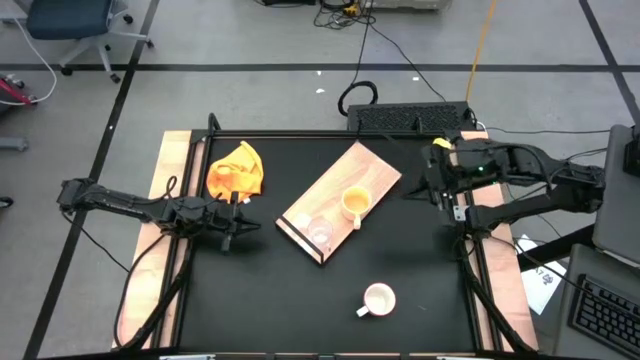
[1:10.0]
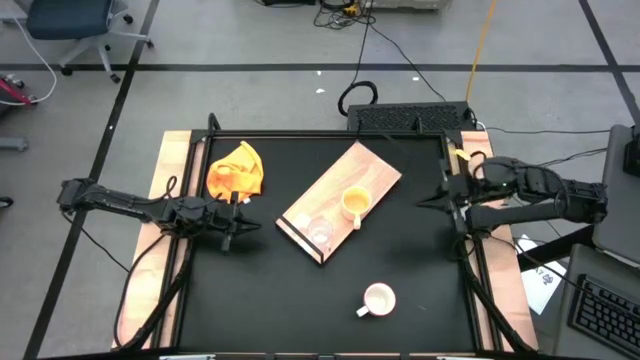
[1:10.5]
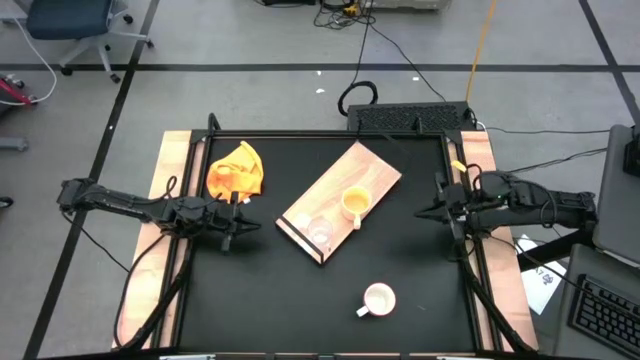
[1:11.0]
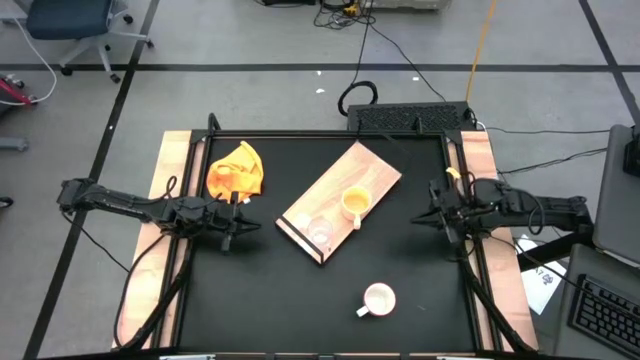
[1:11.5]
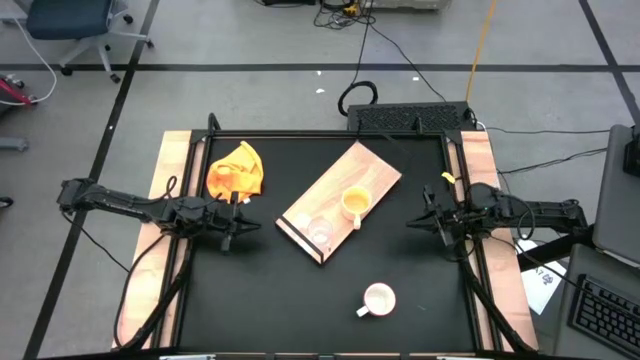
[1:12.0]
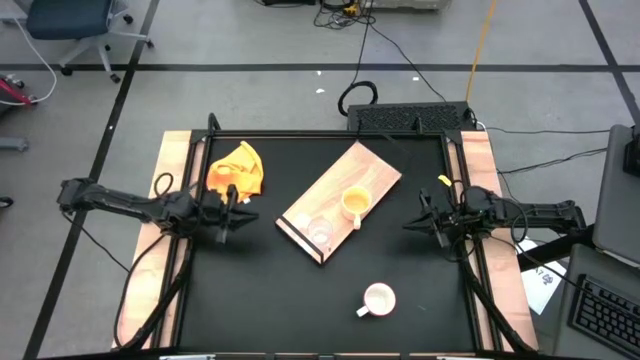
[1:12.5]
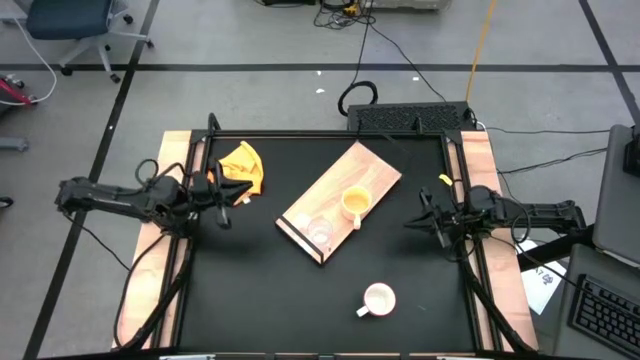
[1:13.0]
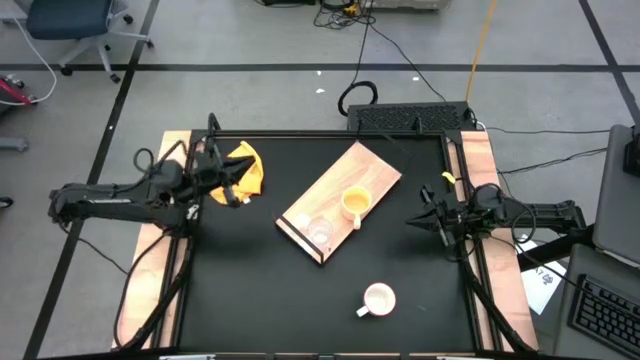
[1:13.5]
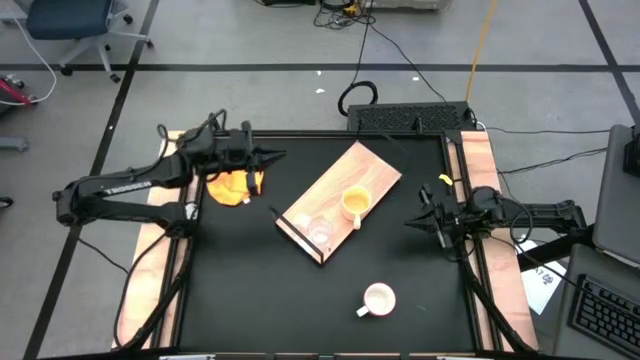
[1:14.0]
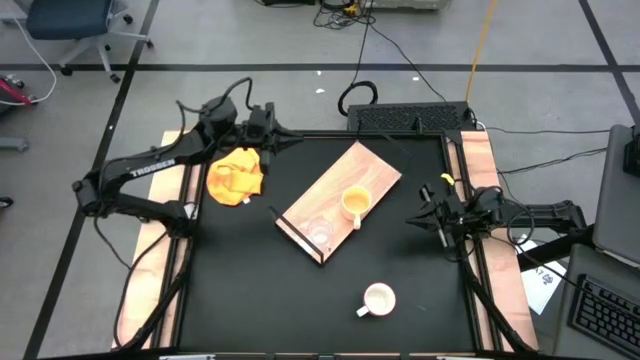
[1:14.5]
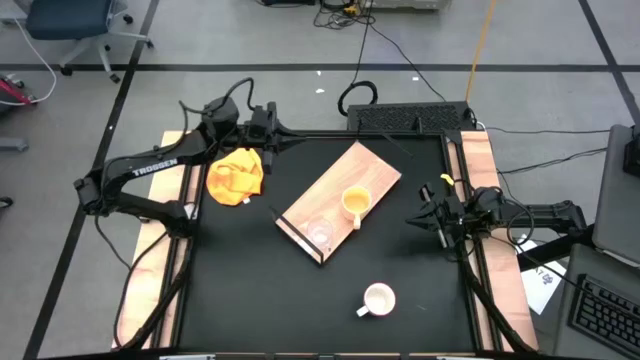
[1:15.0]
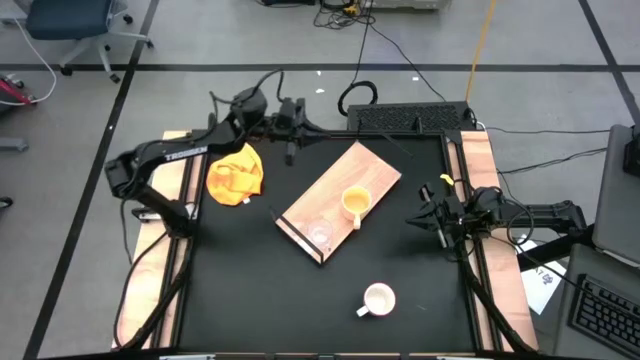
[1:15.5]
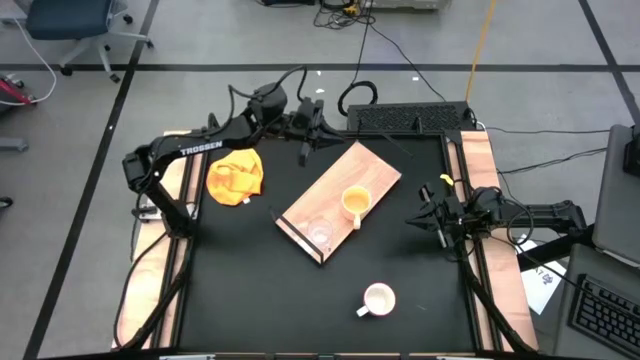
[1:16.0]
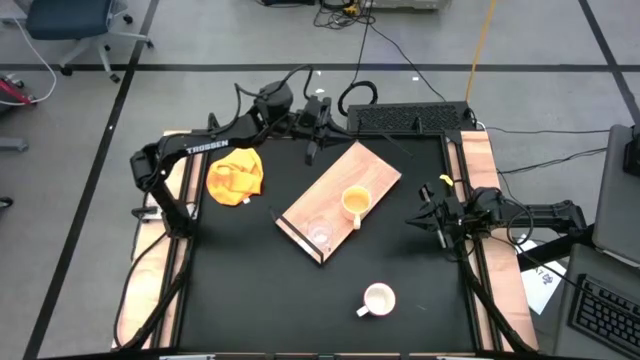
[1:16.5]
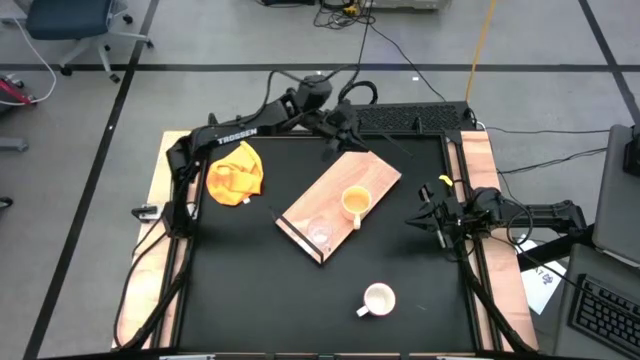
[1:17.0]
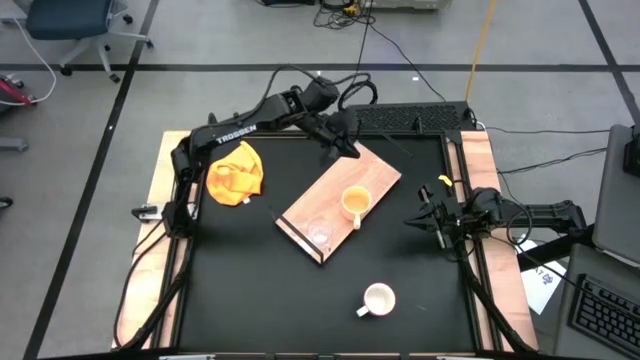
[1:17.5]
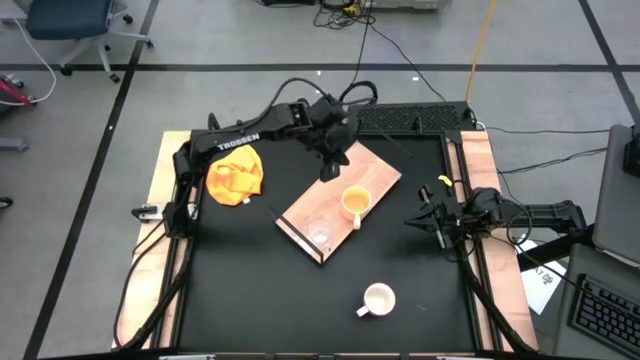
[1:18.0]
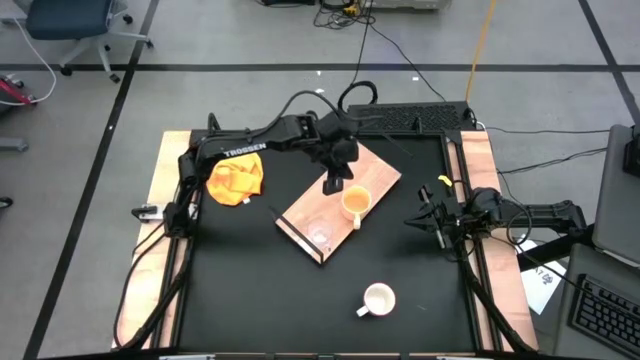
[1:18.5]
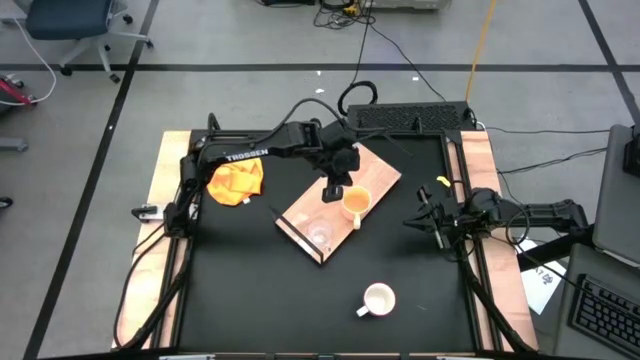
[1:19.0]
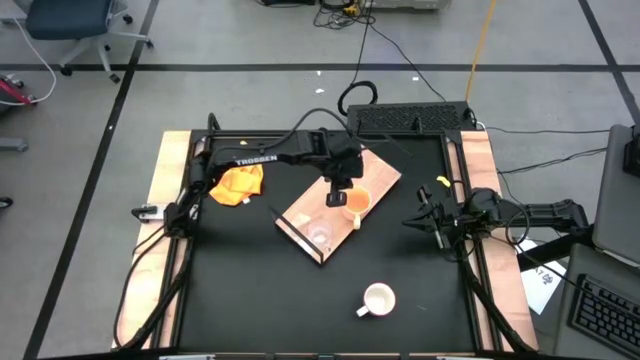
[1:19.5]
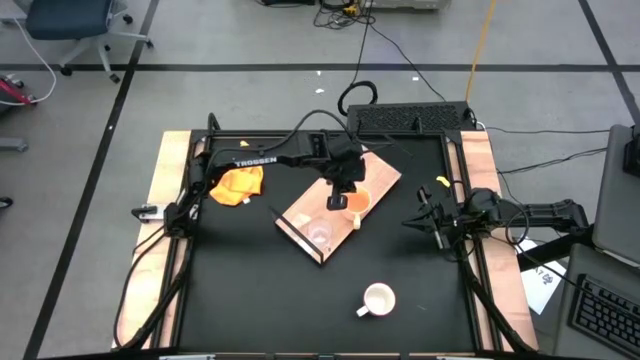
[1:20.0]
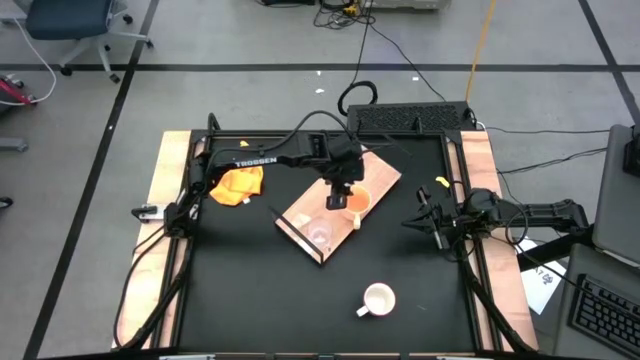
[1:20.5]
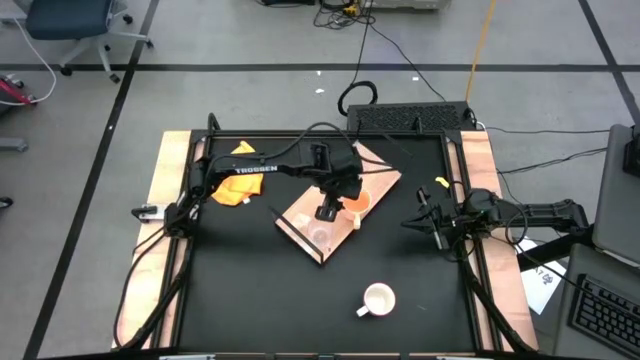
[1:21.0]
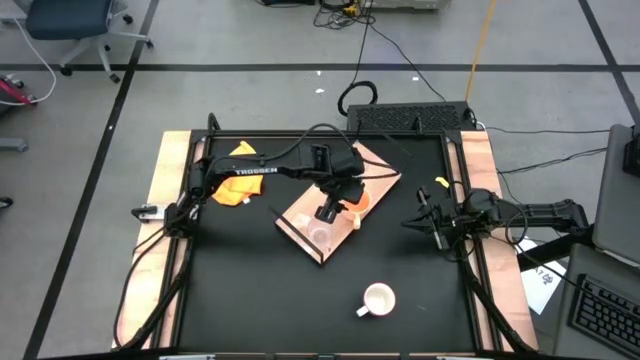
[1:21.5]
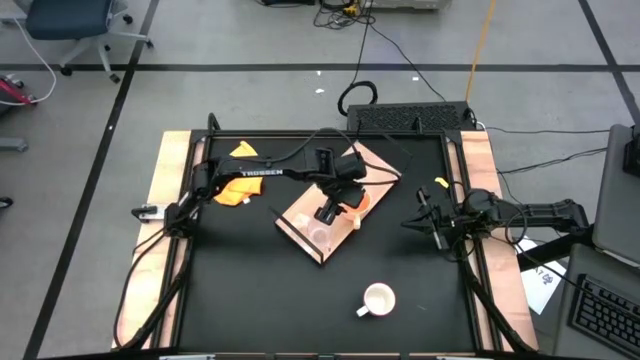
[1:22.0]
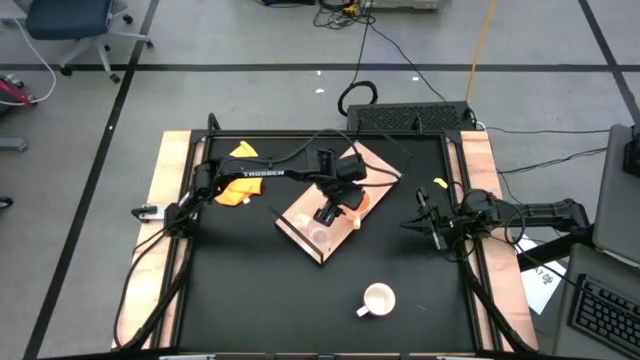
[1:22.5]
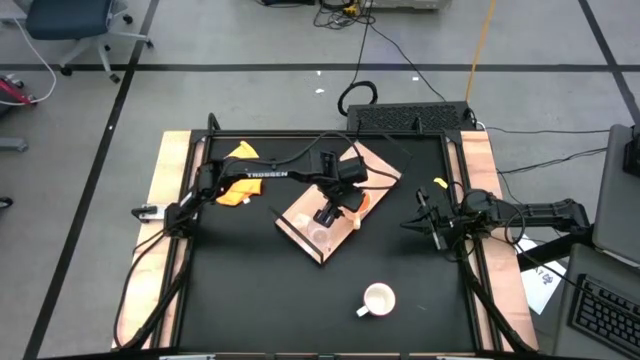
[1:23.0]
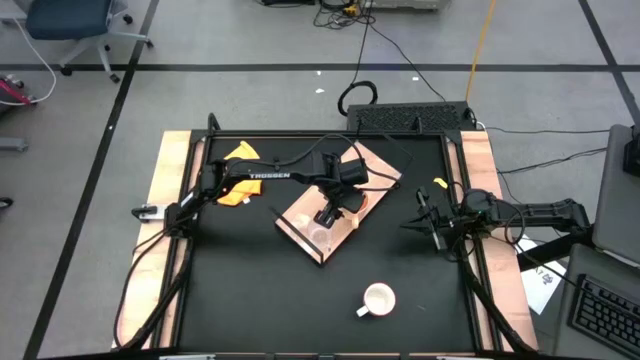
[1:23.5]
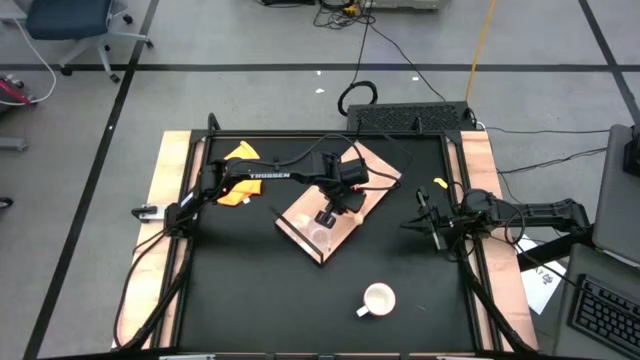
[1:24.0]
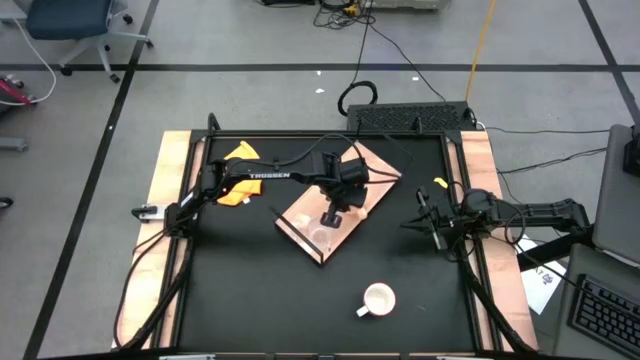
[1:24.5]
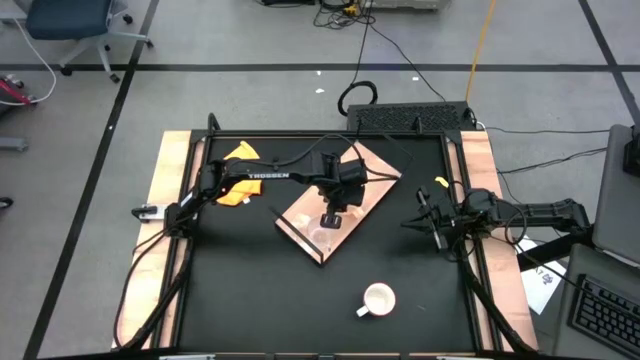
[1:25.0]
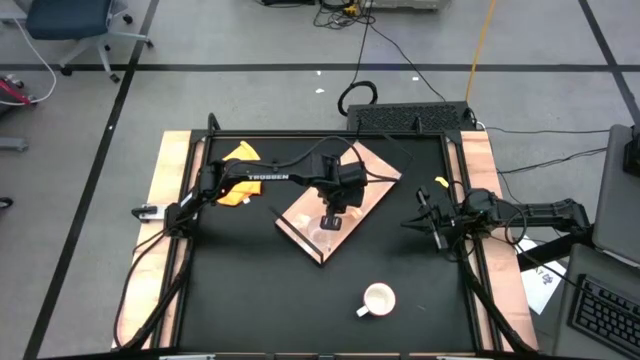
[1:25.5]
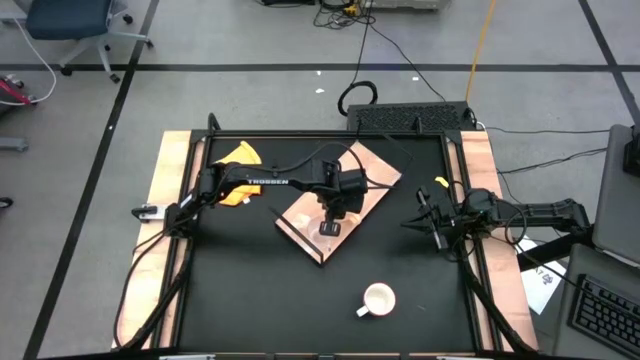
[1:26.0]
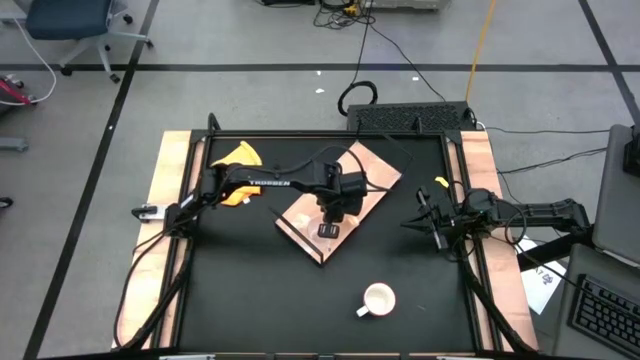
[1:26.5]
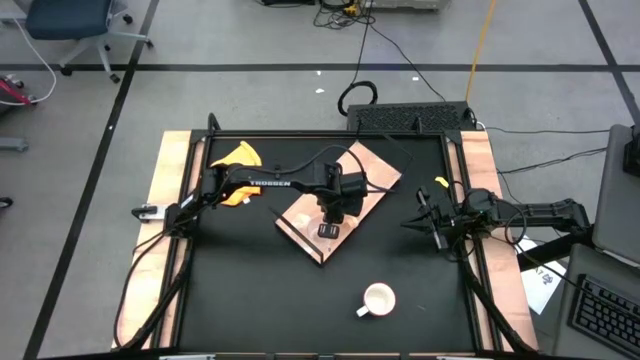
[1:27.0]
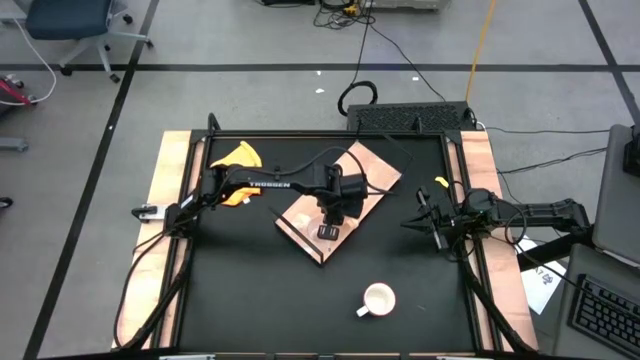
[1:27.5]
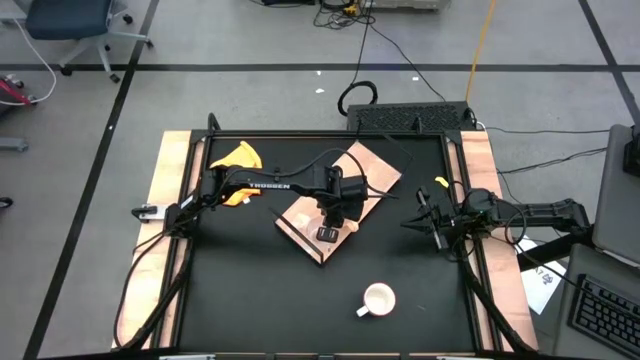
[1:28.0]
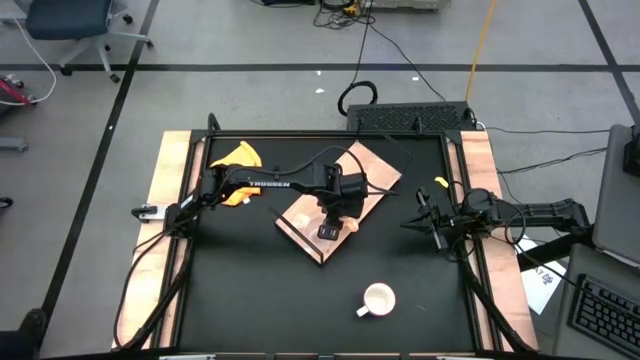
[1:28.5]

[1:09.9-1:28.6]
Task: Stack small to large cups/mugs on shelf
Put the orange mug on the shelf
